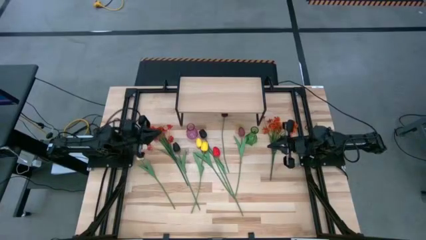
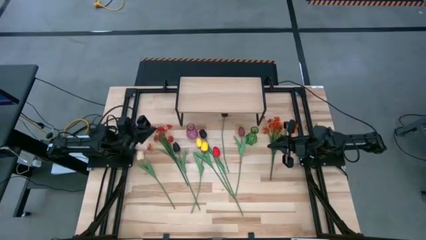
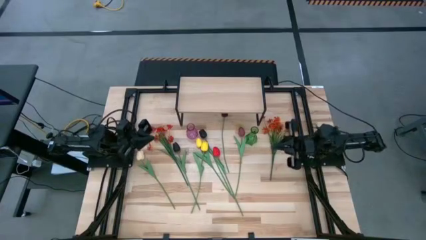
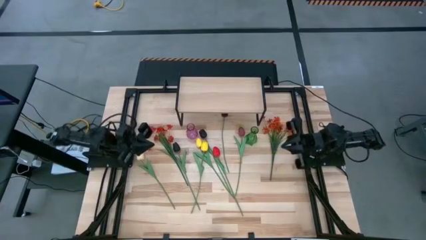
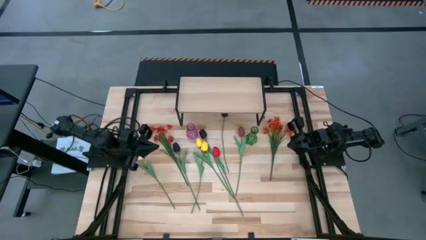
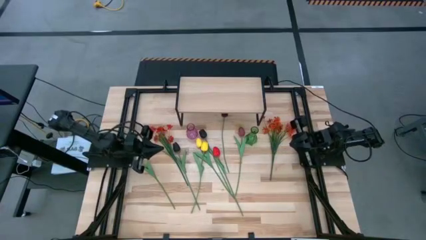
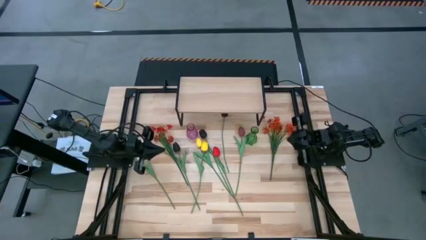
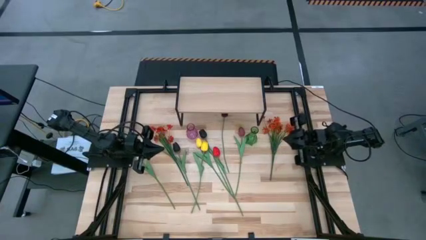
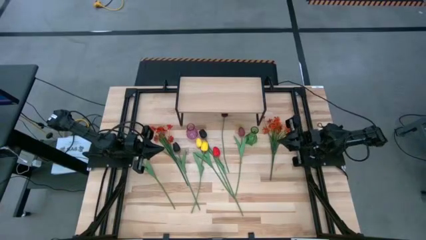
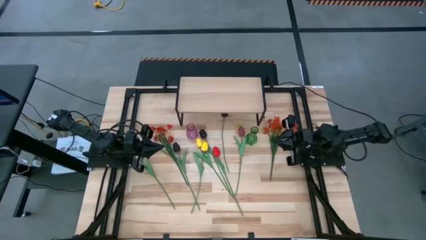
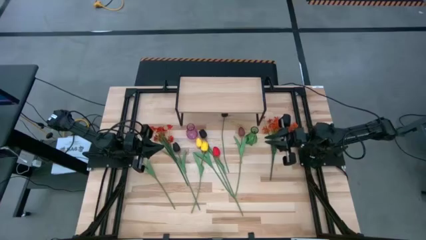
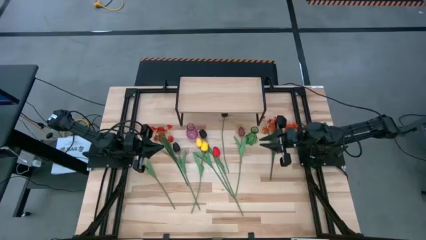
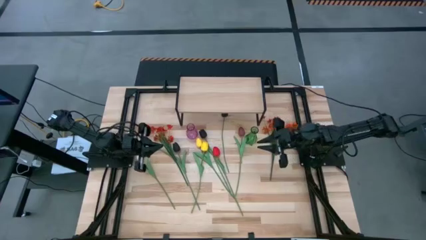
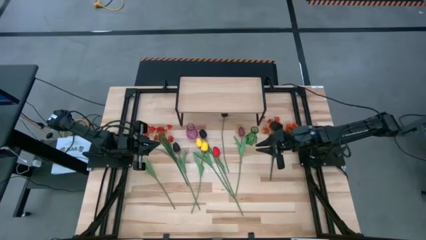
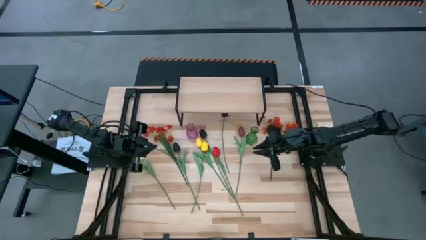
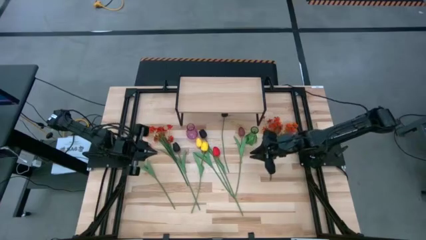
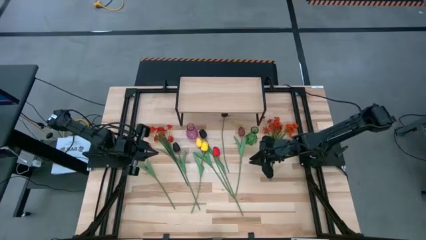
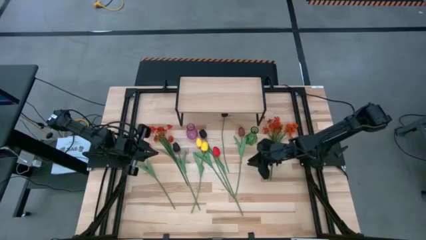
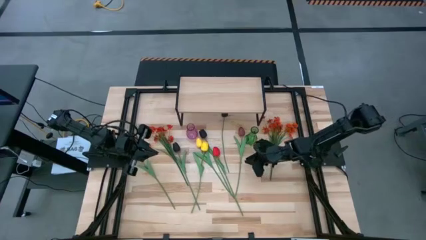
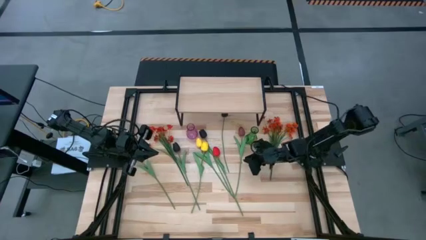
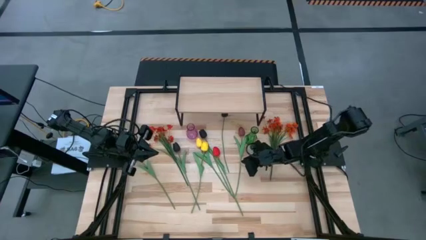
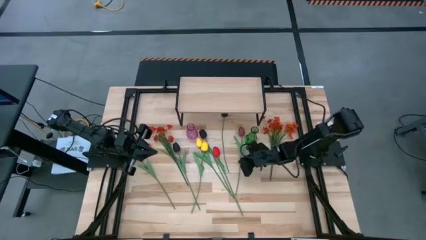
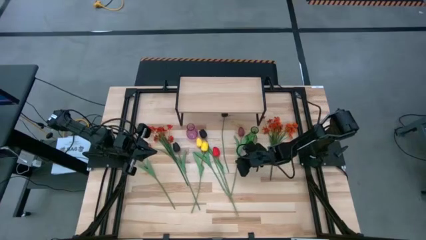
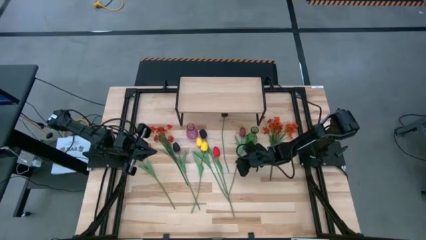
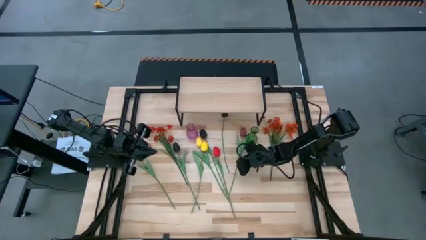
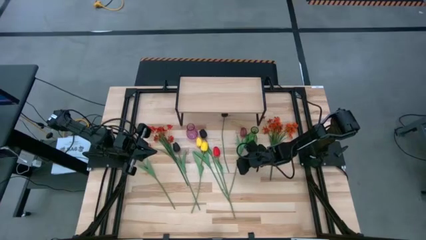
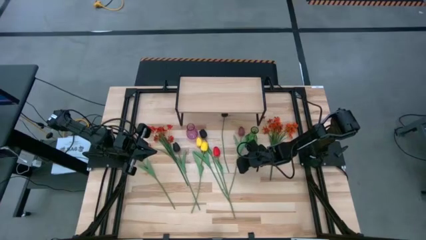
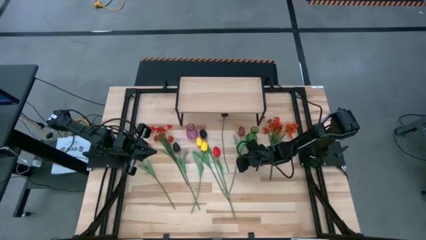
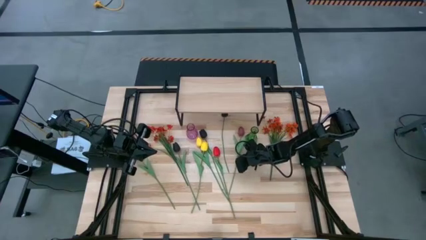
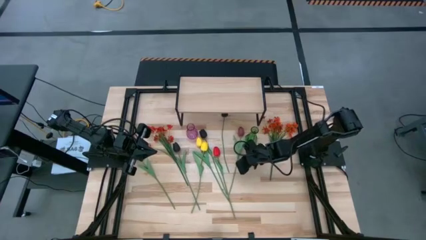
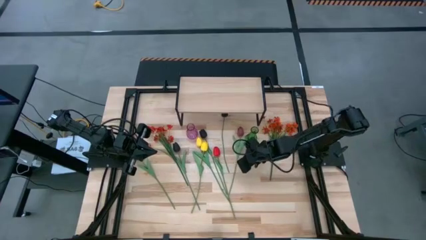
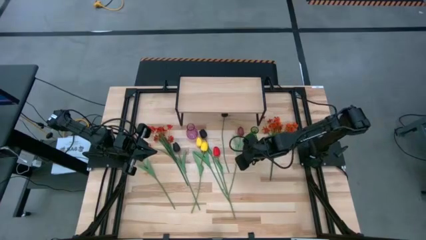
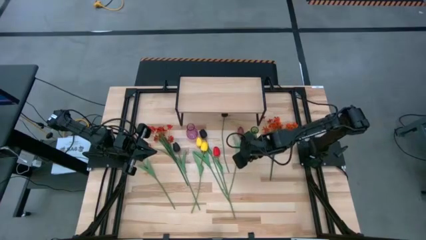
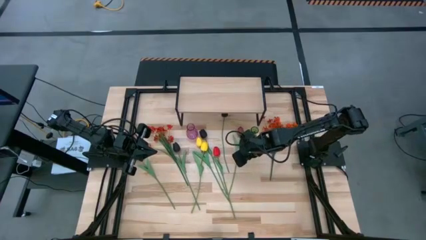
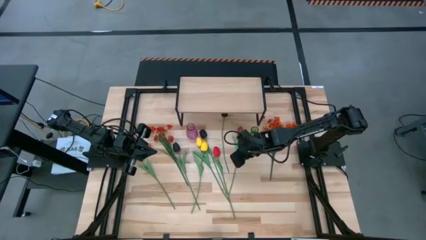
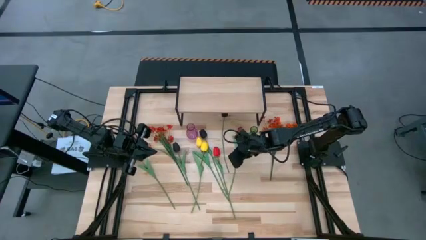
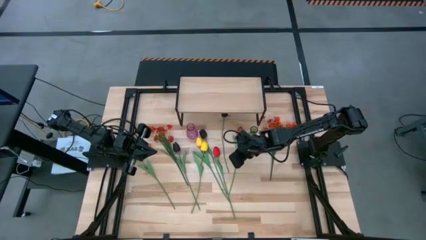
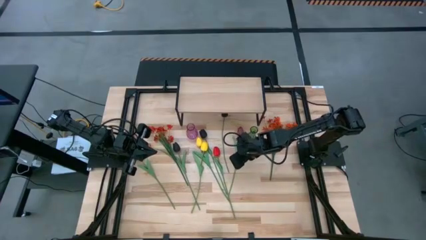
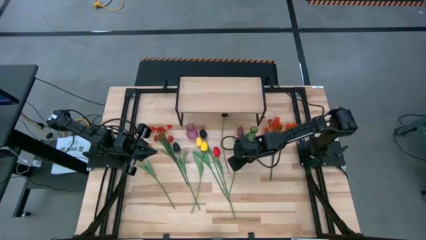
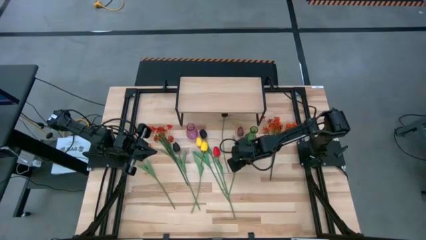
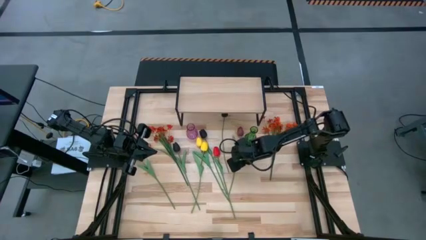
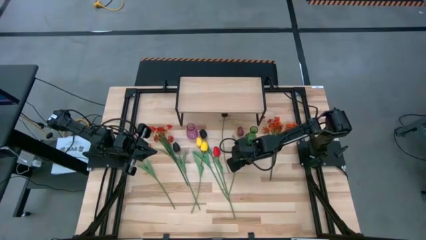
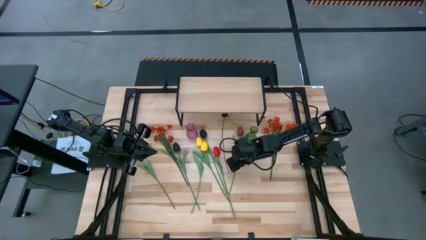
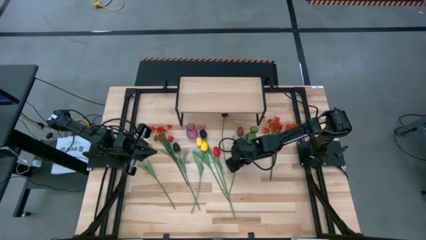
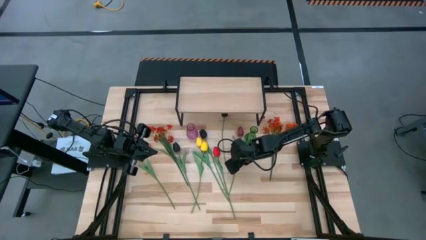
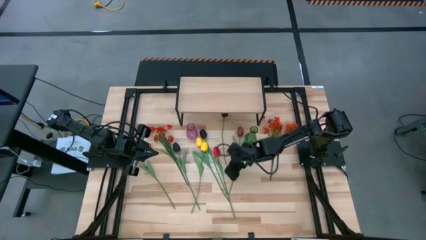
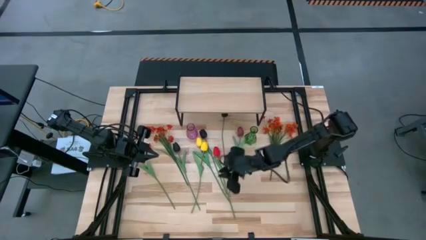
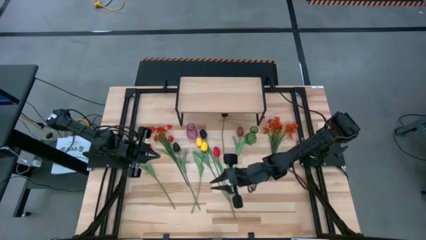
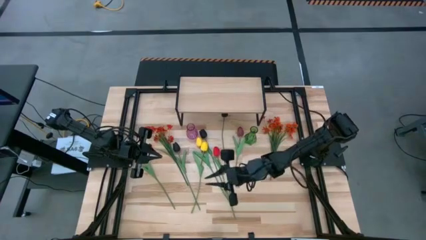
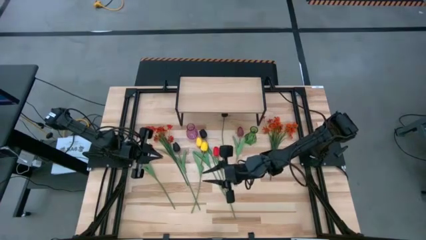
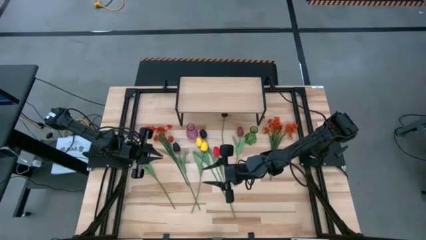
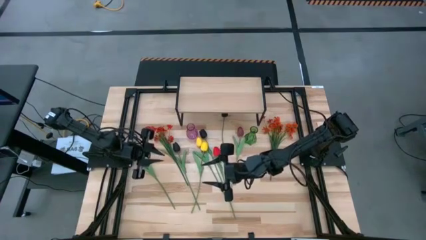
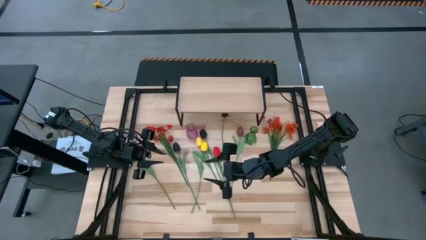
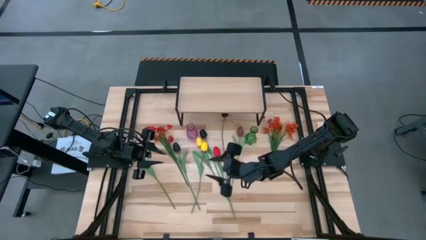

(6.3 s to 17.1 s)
Task: Pick and place flowers into a vace then onto a shelf
Put the red tulip into the green vase
